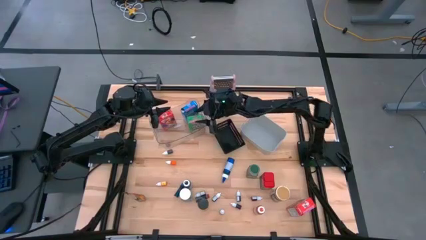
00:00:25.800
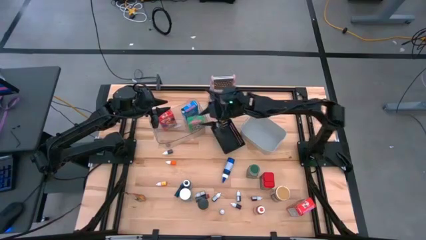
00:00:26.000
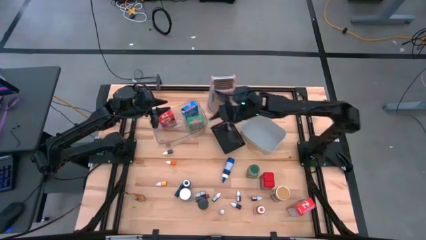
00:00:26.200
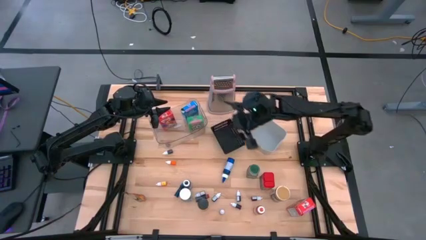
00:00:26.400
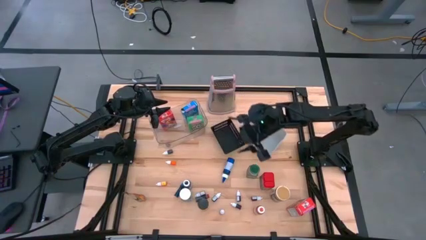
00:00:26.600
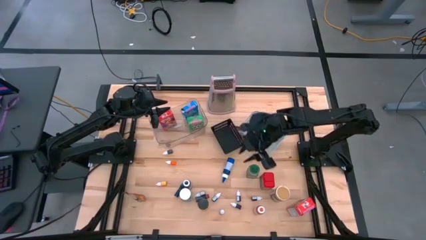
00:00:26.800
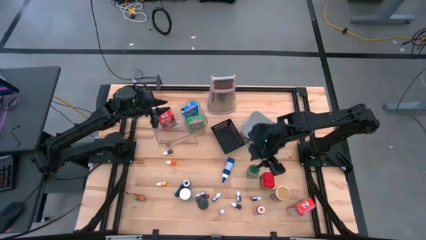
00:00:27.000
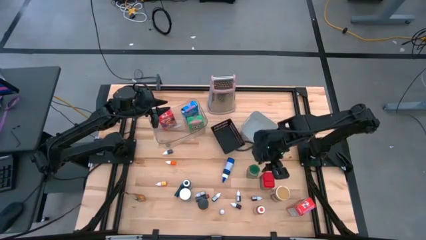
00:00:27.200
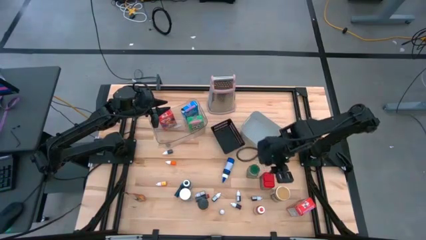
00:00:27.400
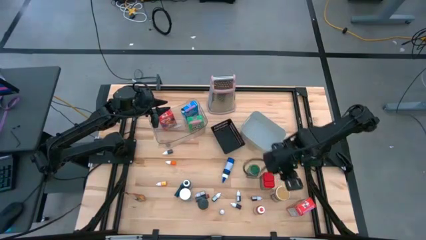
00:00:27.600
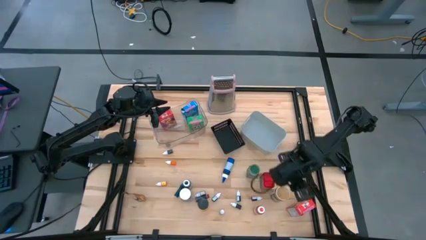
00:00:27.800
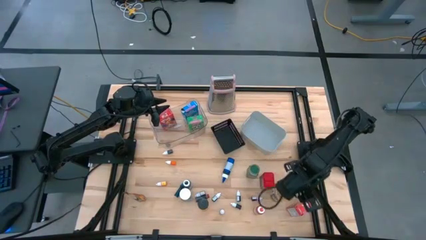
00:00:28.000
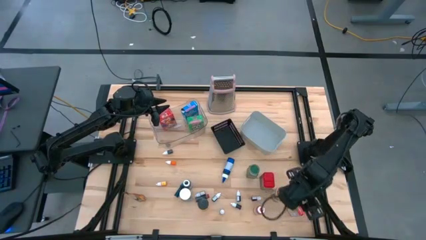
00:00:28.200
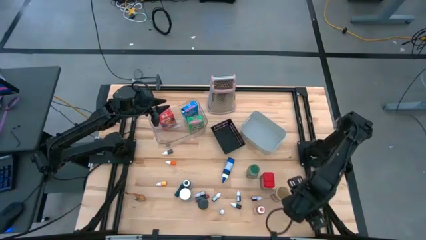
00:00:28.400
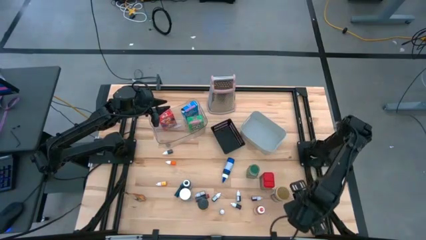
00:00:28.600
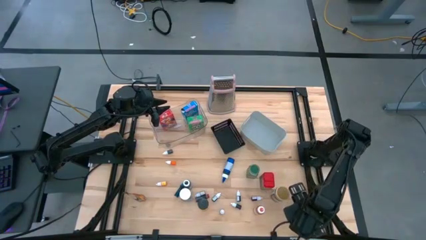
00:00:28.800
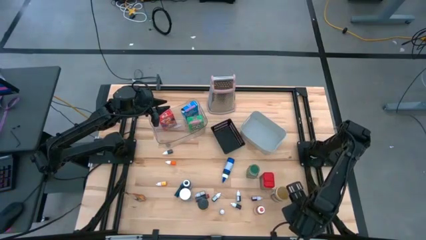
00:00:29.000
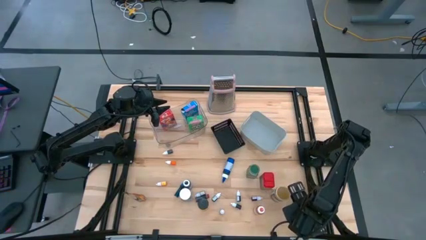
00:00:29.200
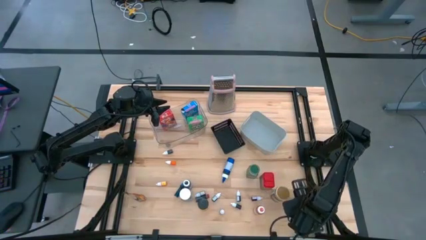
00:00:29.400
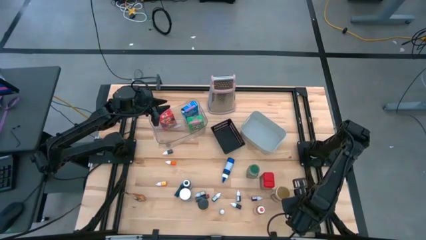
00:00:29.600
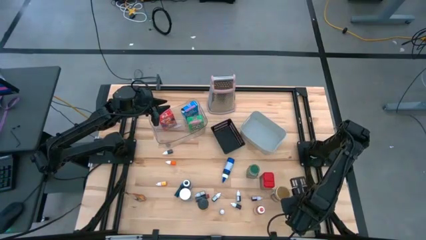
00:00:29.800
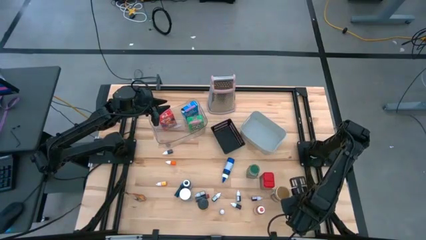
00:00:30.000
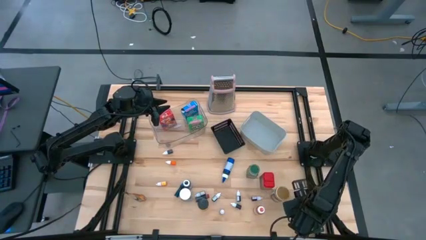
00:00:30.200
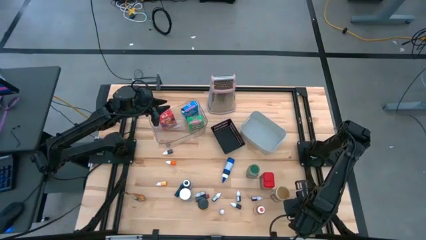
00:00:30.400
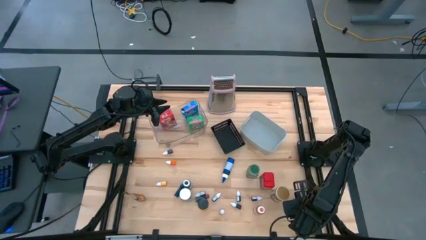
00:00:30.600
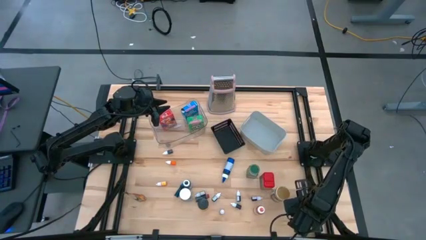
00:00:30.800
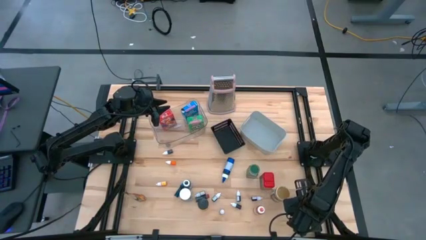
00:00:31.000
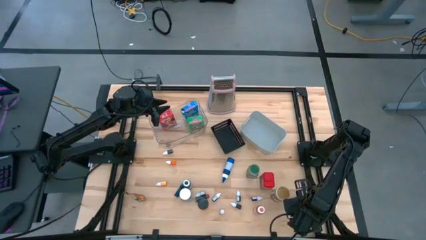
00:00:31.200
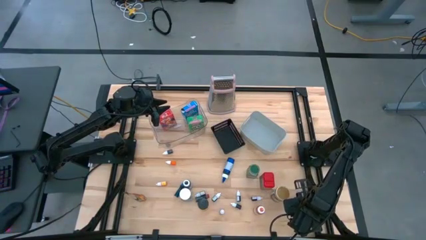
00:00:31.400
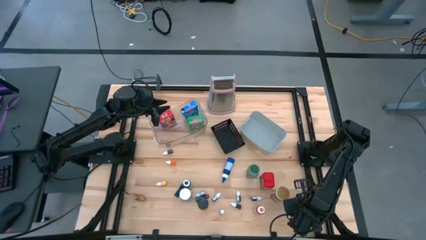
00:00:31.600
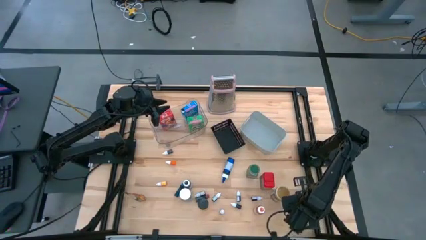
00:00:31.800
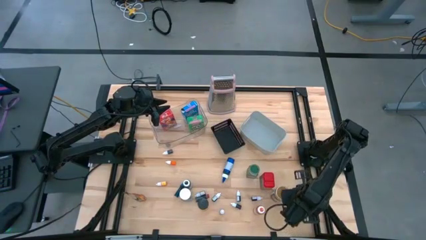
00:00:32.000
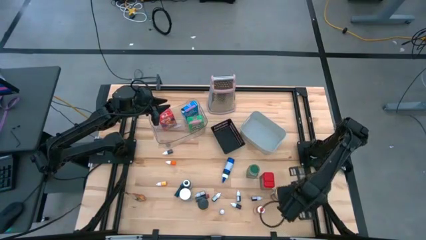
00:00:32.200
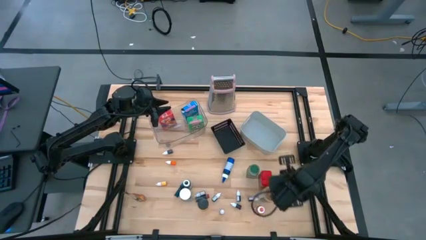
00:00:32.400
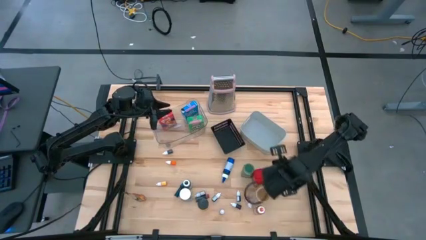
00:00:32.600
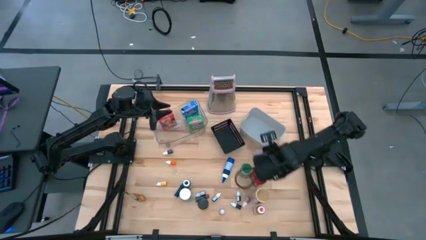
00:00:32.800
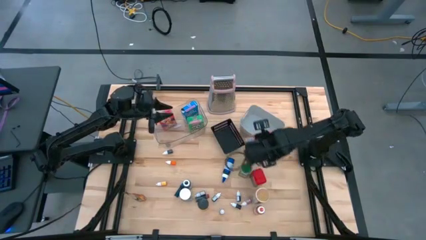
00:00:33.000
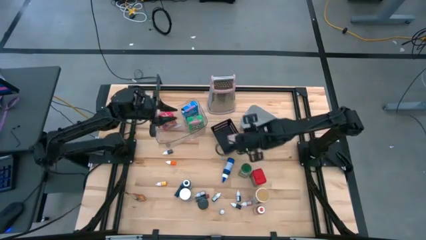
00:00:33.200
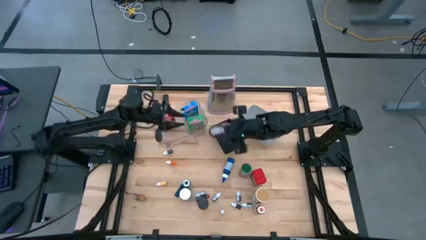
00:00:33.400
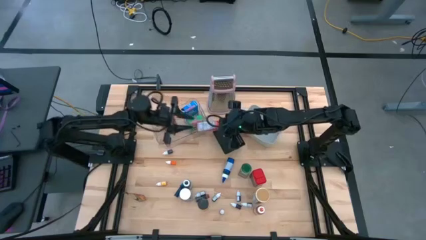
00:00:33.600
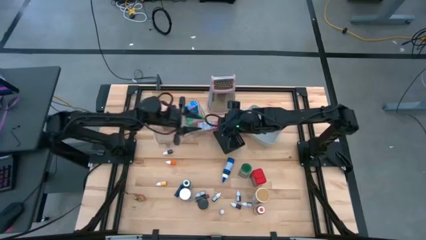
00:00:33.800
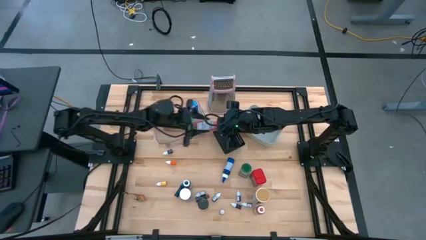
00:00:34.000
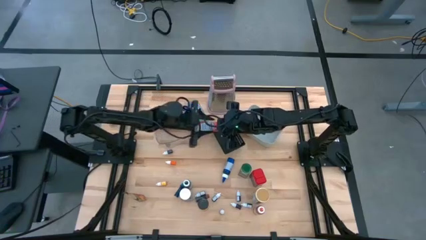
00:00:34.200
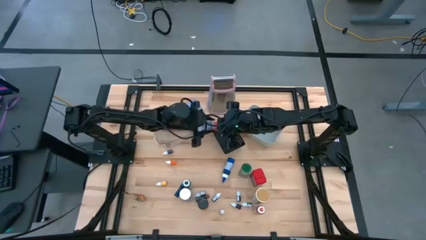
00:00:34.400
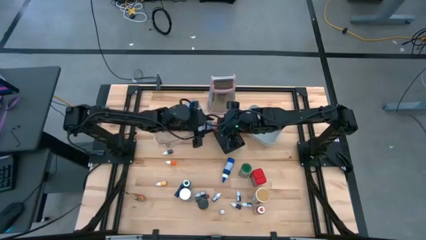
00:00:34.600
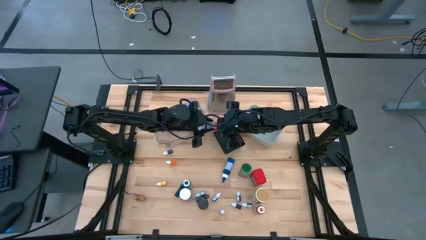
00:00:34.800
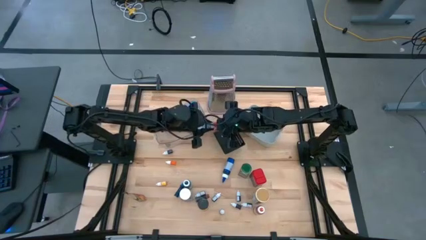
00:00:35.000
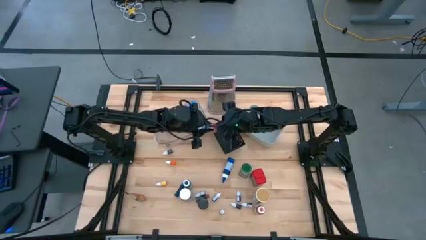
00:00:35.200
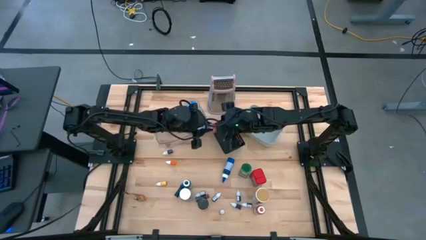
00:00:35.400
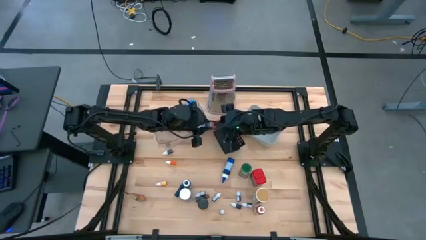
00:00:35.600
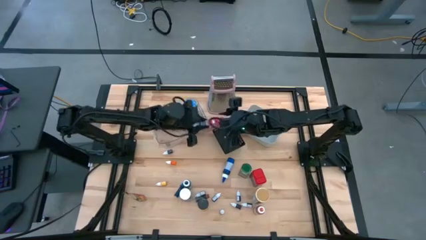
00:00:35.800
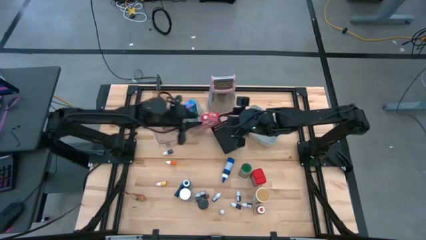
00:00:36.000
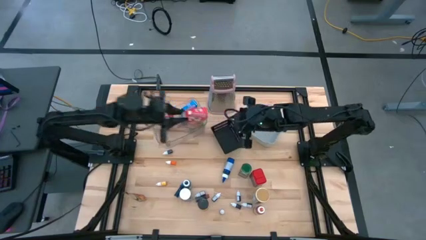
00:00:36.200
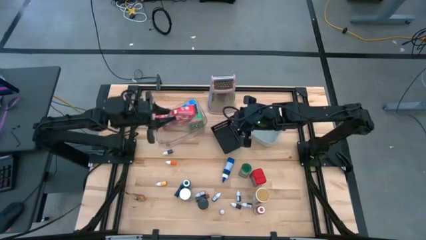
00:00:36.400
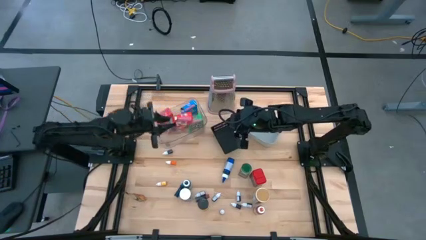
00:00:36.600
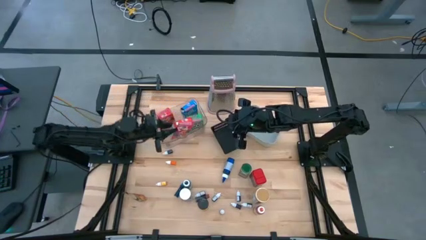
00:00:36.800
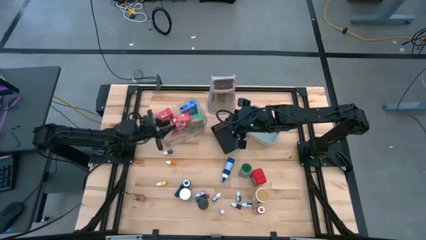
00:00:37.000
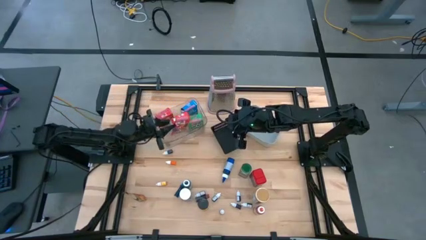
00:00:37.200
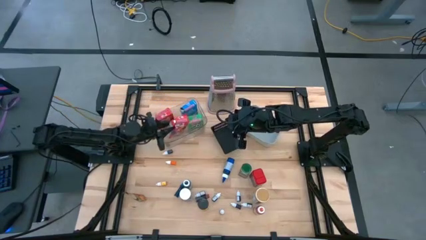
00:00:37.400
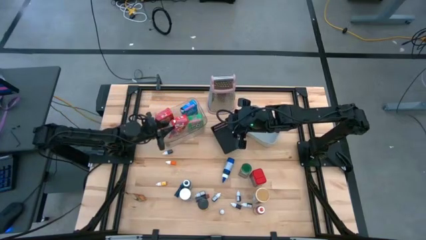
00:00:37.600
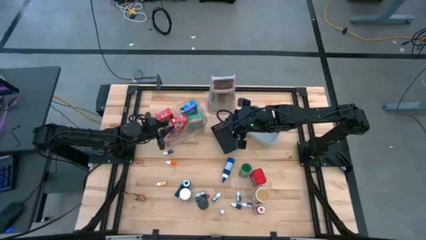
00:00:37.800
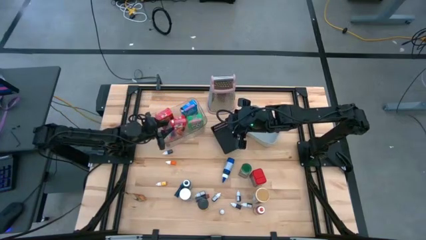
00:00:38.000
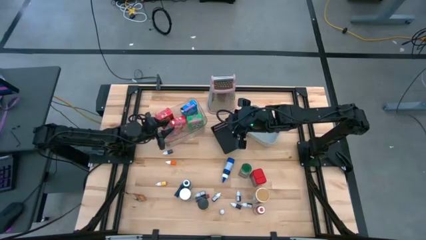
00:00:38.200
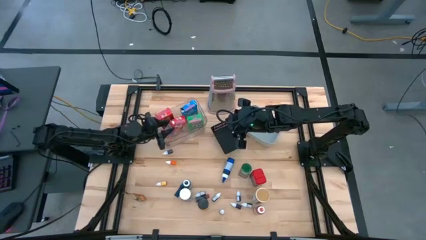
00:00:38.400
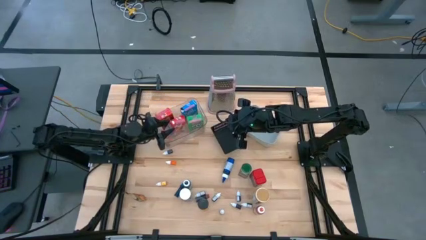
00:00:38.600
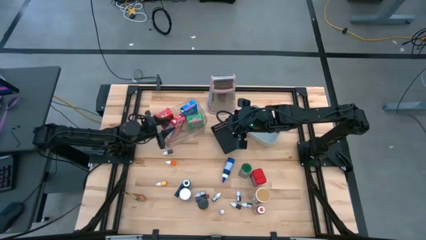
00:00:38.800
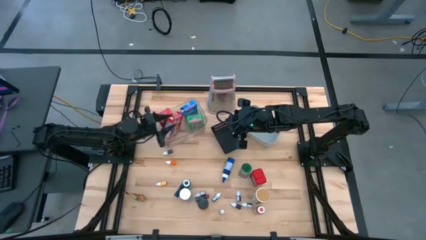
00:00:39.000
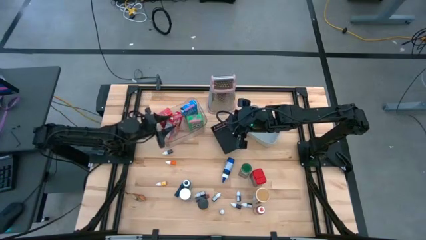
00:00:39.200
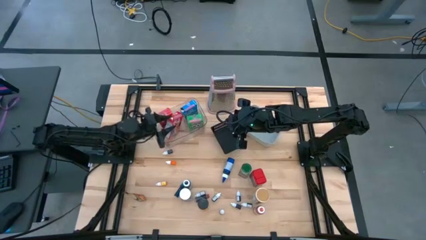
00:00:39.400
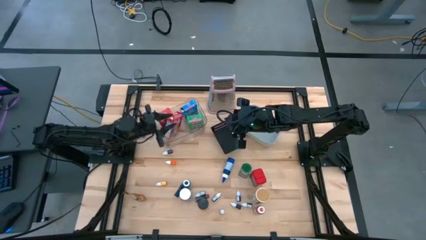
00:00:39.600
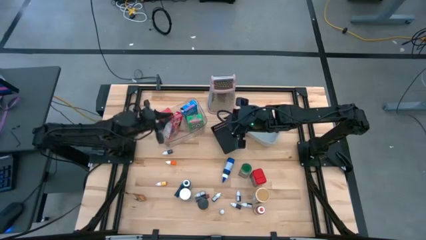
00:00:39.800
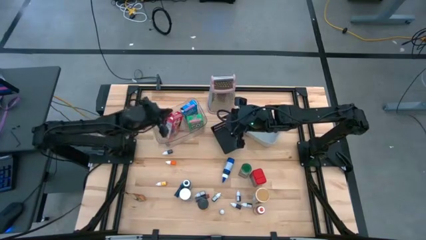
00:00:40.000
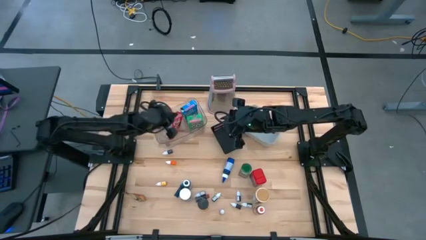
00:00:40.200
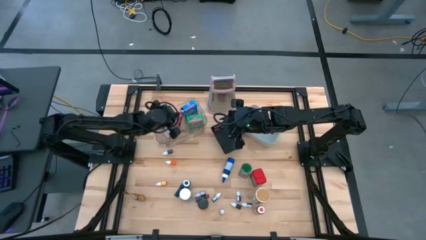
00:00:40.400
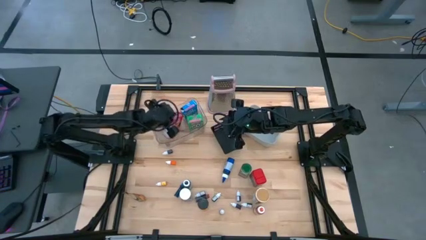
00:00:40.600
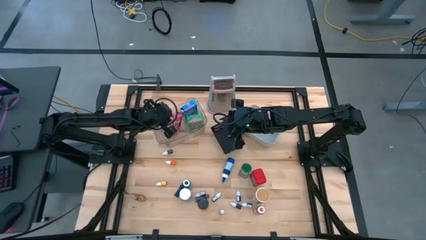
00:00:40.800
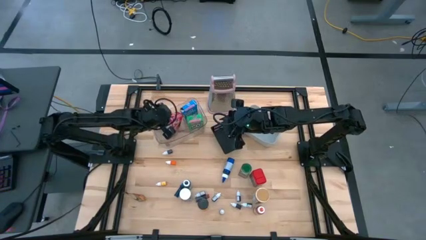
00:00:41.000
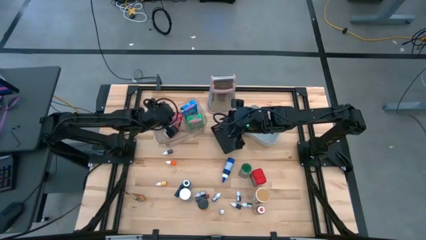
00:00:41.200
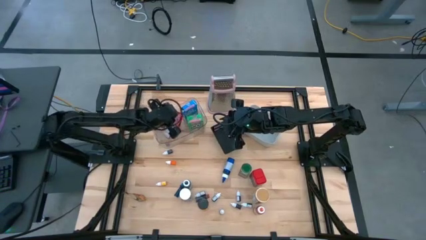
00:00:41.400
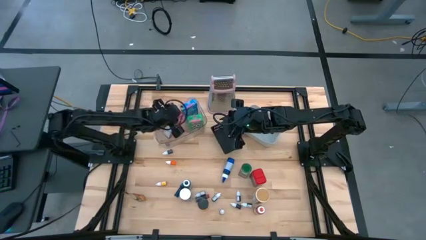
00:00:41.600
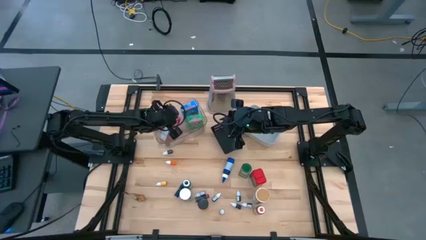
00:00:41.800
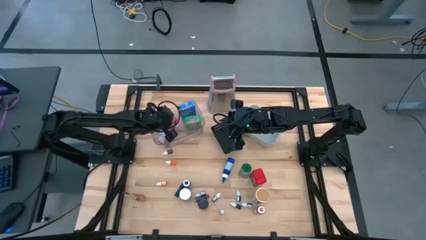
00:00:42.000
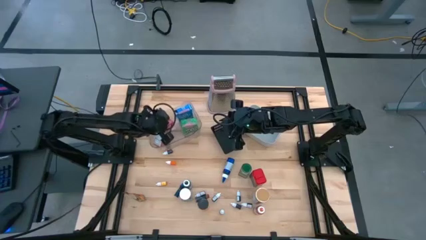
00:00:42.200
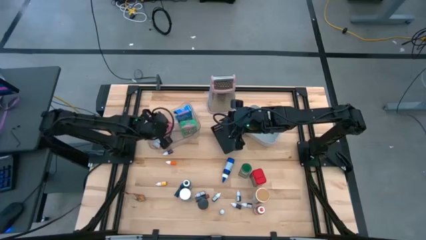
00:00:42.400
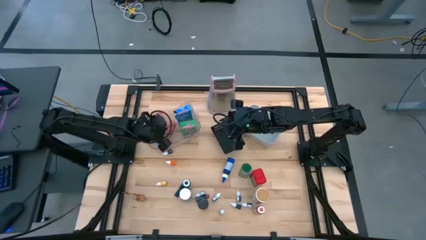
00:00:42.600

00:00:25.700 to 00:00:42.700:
Task: Pick & Place Kitchen Items
Put the red cereal box into the transparent bin
